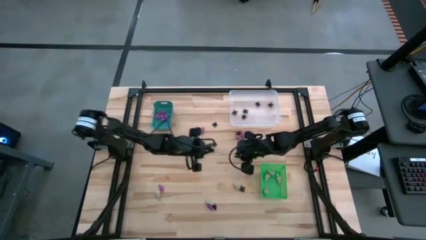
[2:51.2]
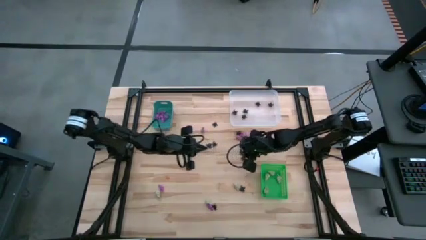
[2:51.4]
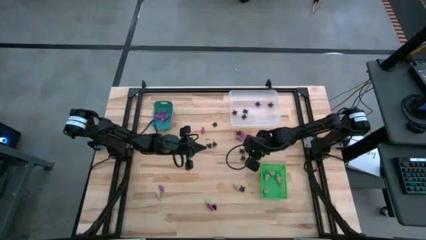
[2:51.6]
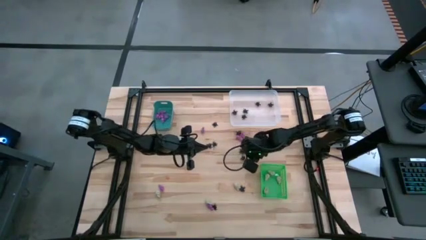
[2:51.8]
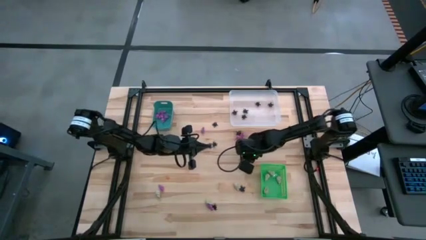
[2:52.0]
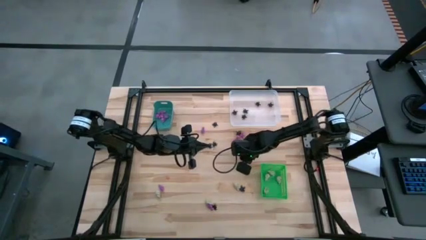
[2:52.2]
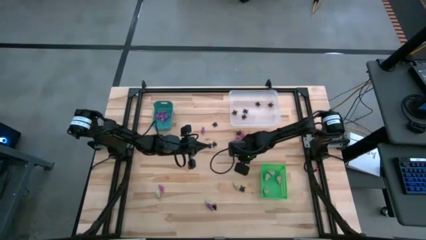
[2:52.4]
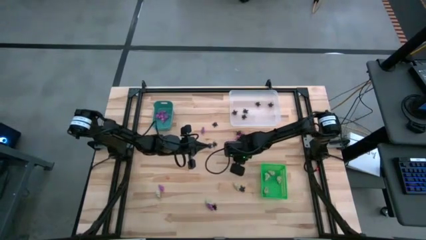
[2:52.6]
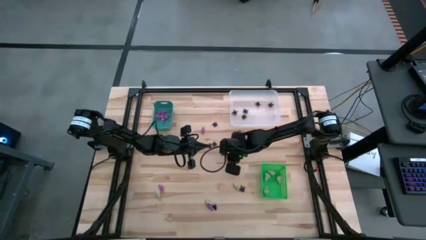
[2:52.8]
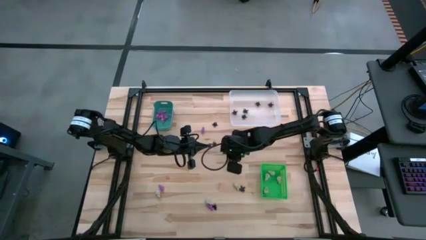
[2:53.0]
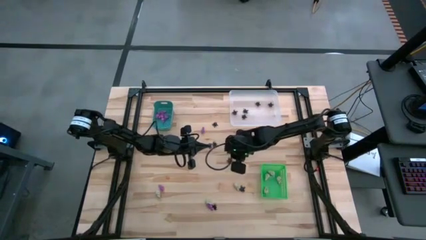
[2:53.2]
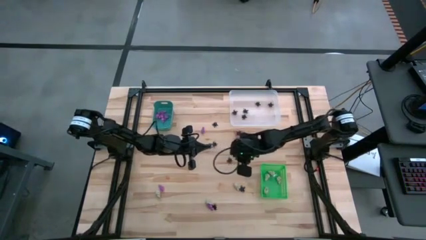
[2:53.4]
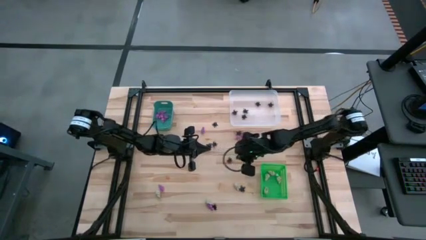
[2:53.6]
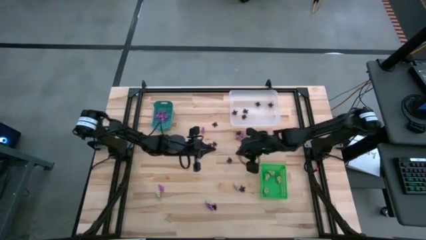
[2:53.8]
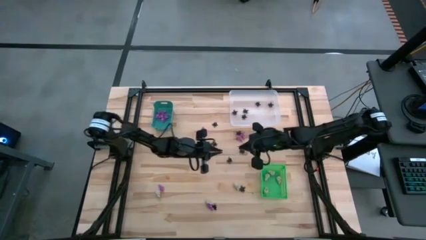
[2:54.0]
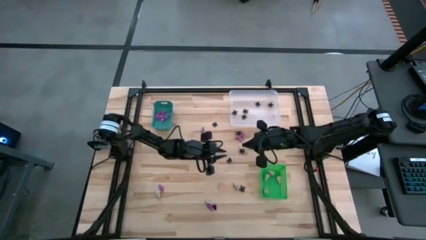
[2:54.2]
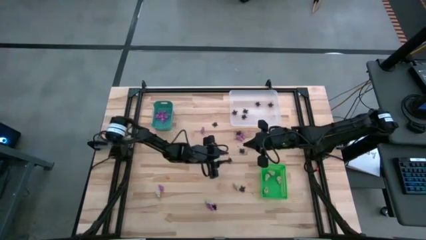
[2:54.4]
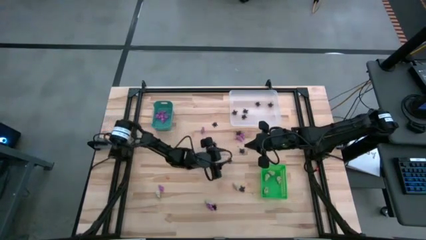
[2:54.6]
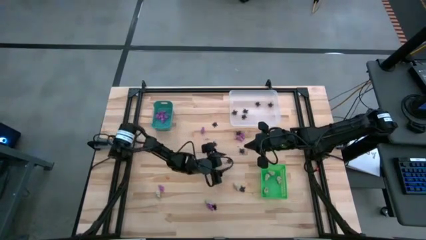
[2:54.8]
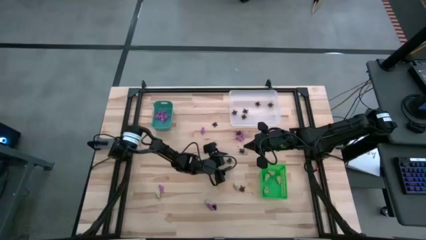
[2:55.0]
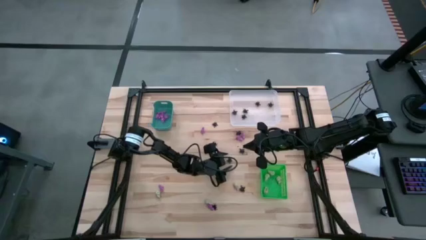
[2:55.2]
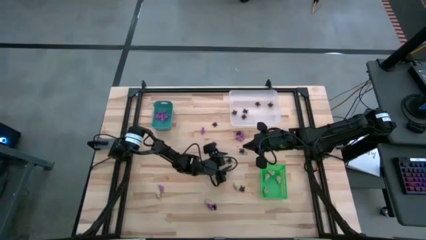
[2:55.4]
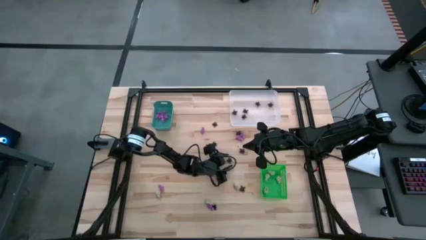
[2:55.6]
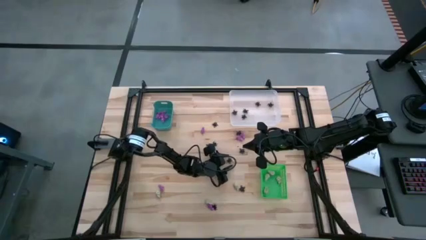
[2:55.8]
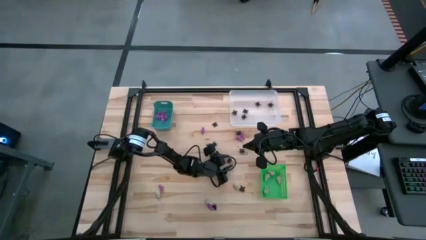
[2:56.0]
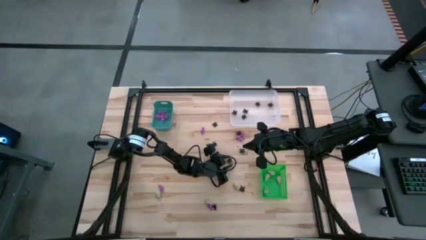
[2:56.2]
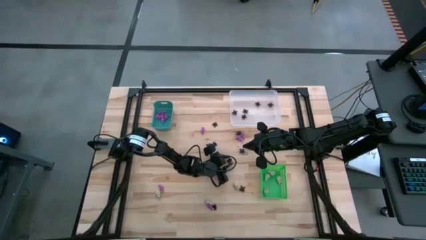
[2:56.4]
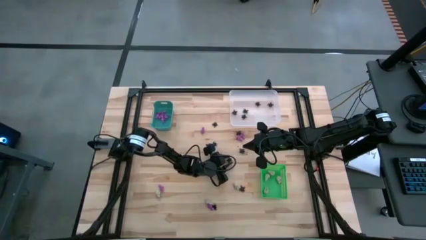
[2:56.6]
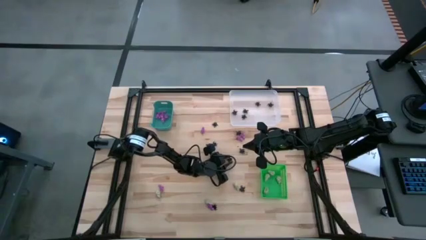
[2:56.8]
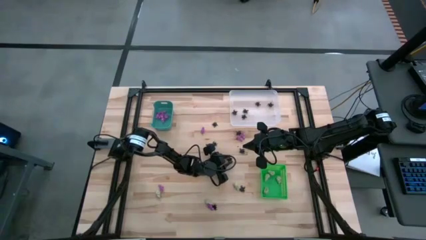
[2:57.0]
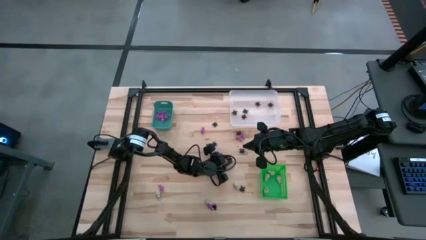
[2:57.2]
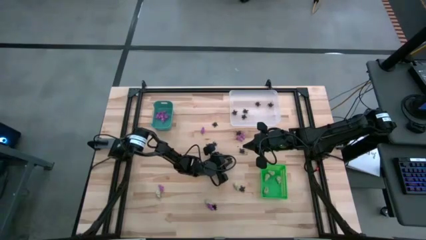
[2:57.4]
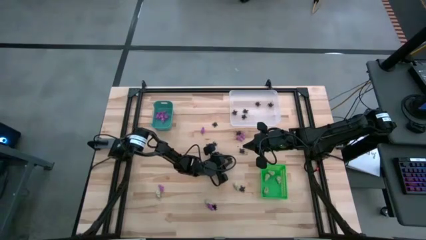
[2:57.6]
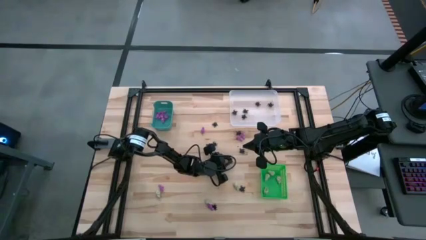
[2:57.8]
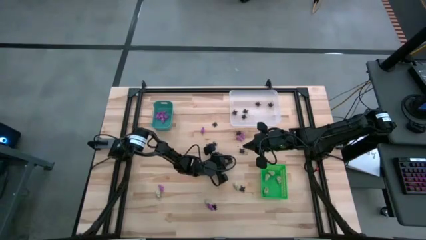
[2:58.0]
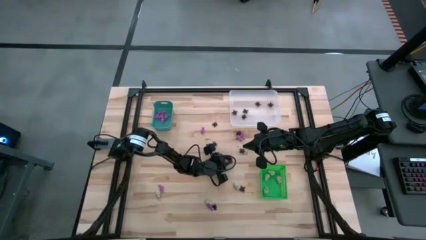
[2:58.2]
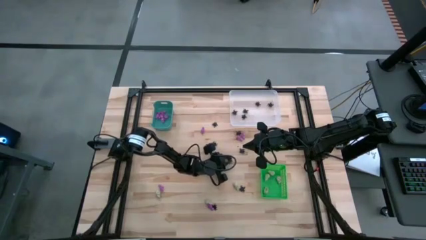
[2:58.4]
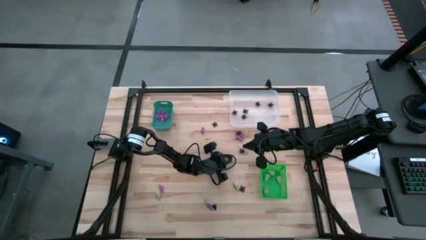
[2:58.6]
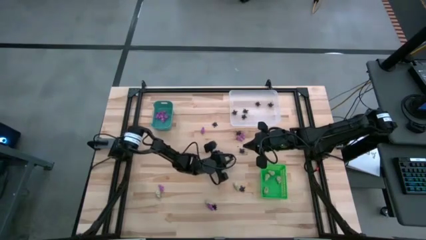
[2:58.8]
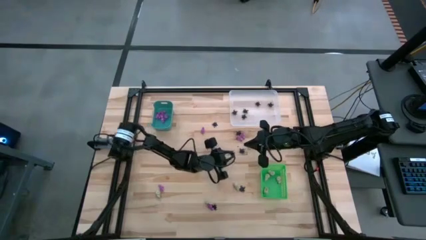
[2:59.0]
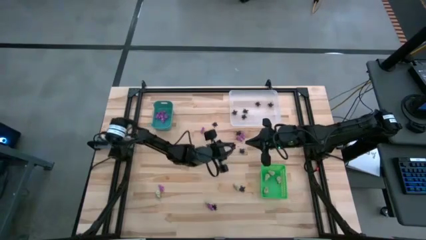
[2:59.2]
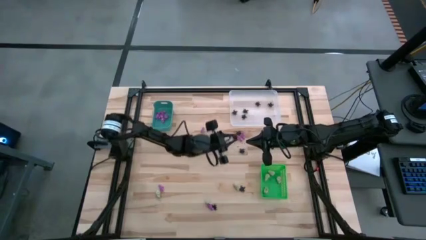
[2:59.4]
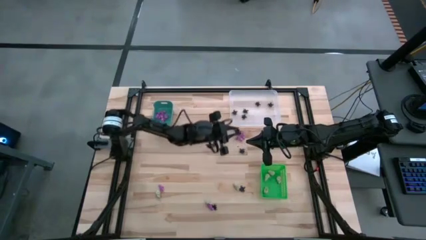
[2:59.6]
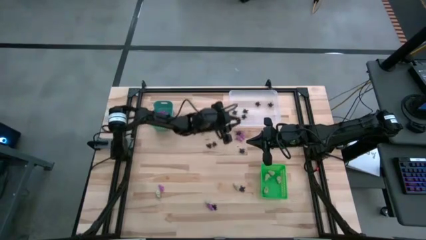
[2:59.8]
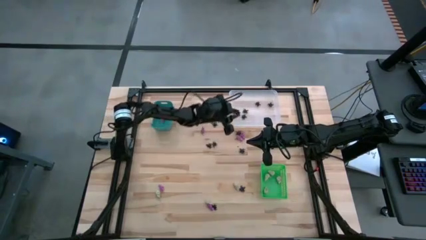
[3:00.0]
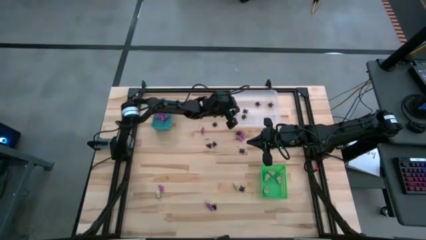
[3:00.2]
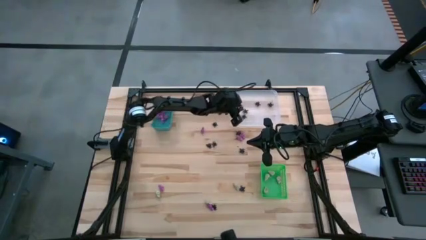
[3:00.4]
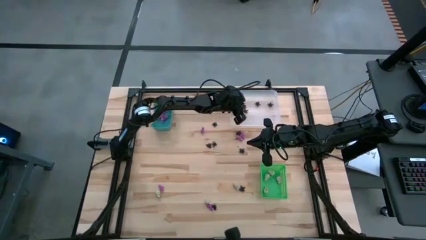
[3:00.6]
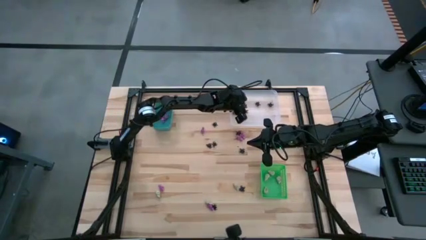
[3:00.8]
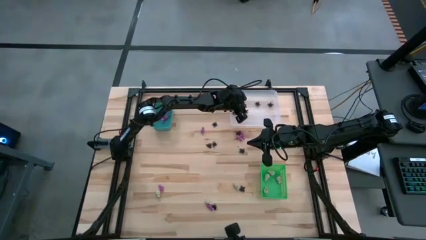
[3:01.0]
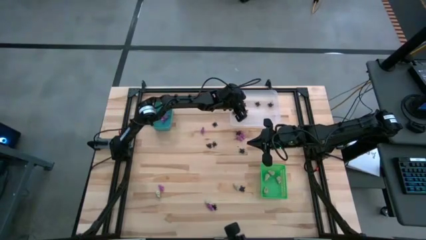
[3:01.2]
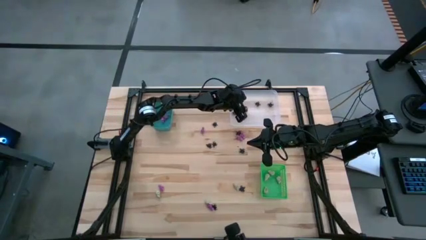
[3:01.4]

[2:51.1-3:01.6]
Task: Sort Halloween decoration
Put the black spider toy into the white bin

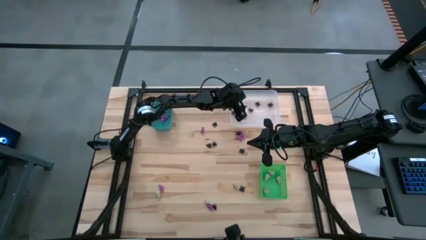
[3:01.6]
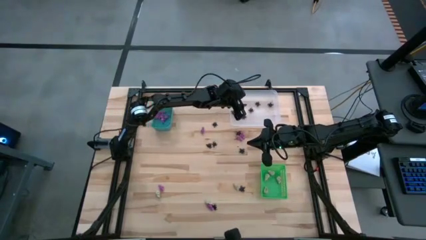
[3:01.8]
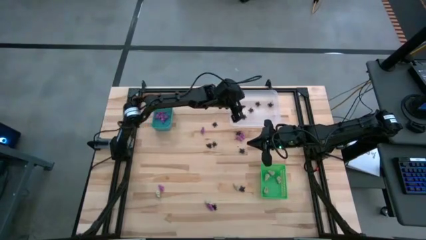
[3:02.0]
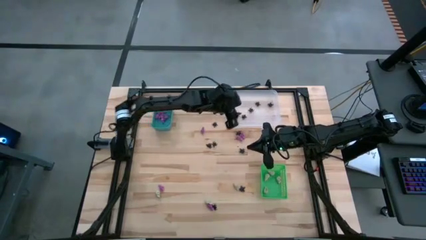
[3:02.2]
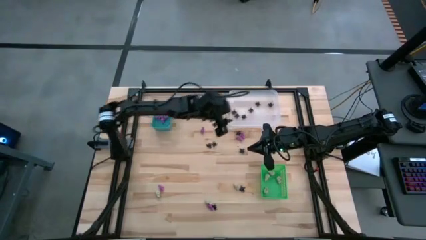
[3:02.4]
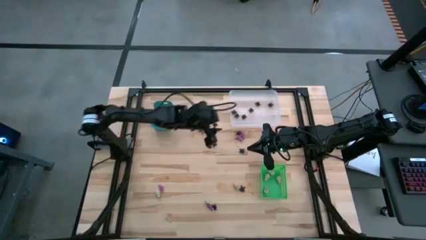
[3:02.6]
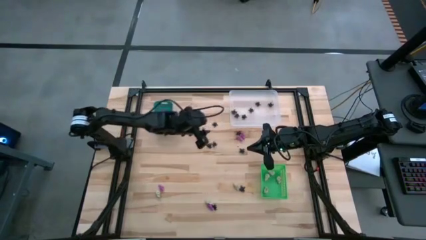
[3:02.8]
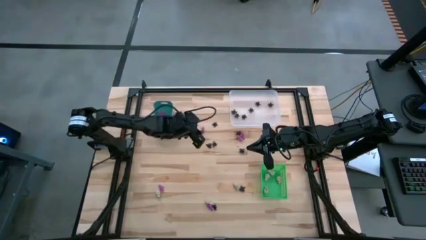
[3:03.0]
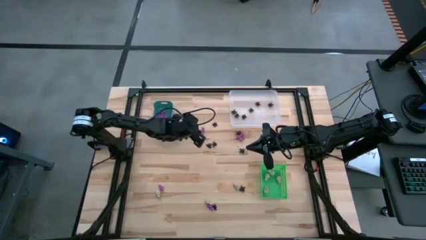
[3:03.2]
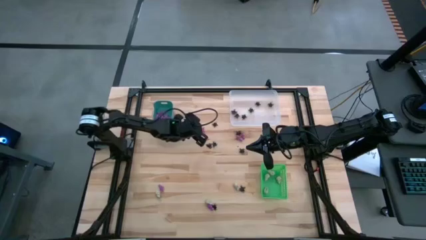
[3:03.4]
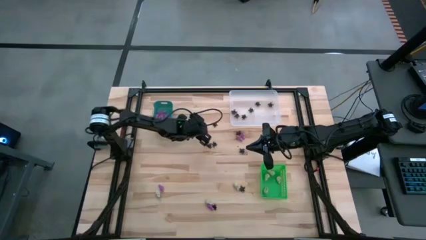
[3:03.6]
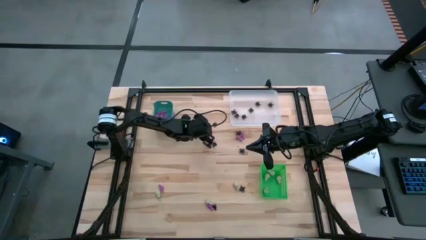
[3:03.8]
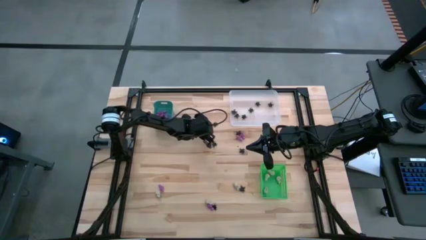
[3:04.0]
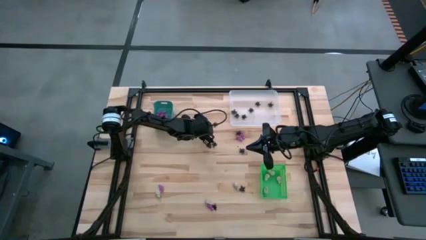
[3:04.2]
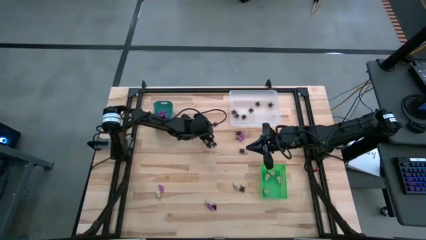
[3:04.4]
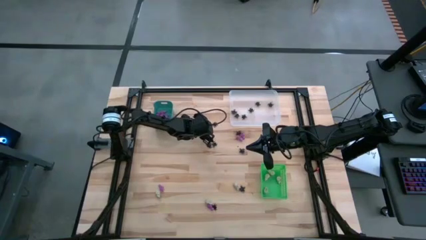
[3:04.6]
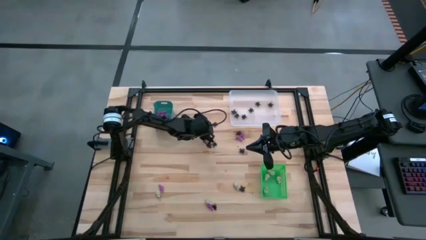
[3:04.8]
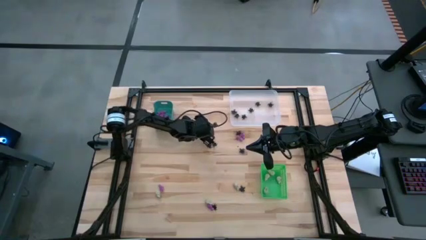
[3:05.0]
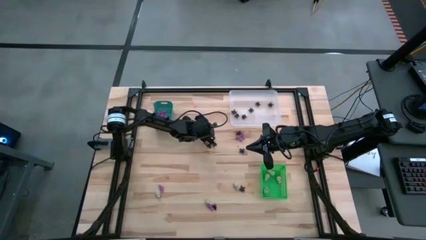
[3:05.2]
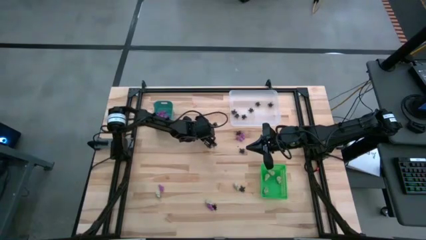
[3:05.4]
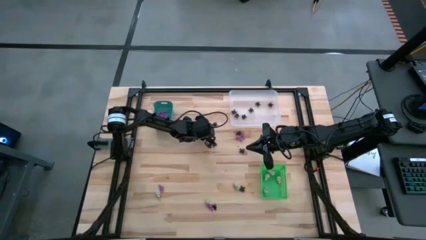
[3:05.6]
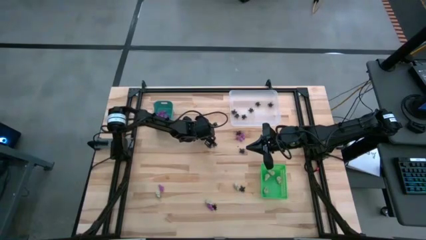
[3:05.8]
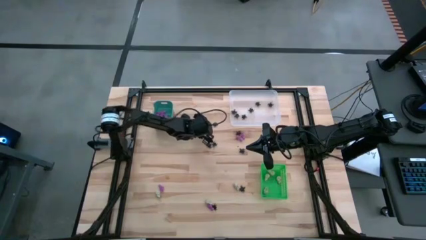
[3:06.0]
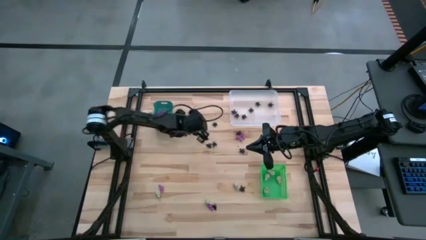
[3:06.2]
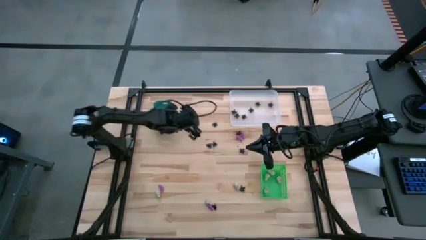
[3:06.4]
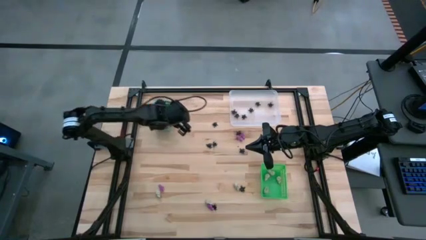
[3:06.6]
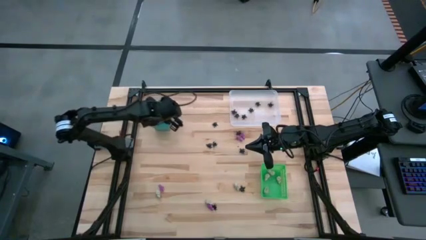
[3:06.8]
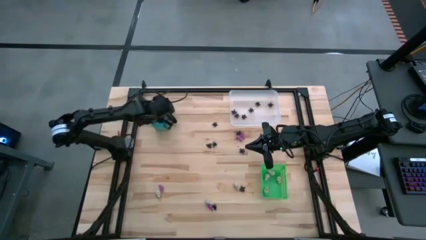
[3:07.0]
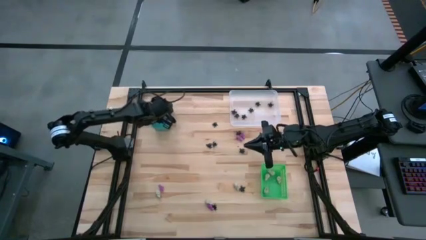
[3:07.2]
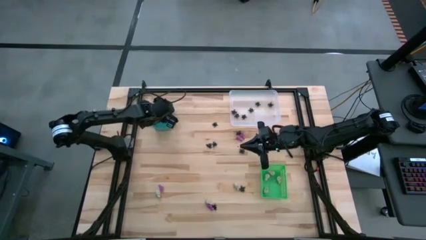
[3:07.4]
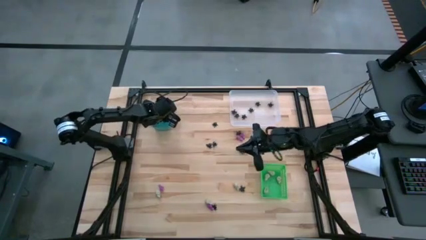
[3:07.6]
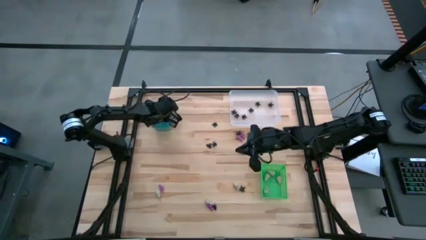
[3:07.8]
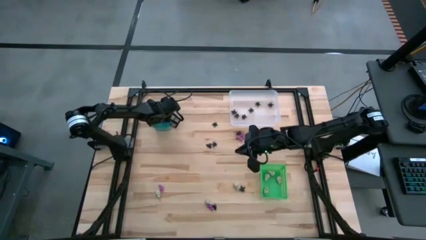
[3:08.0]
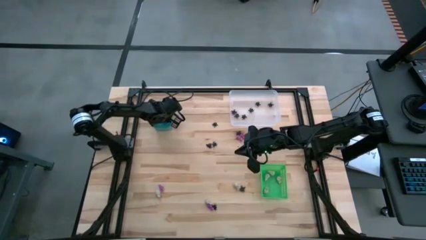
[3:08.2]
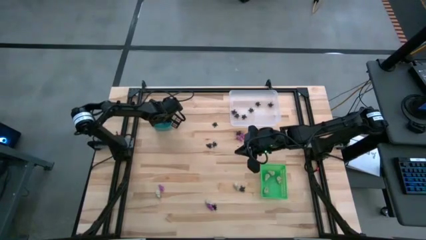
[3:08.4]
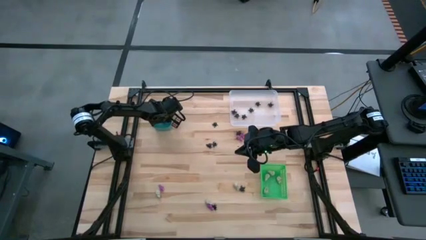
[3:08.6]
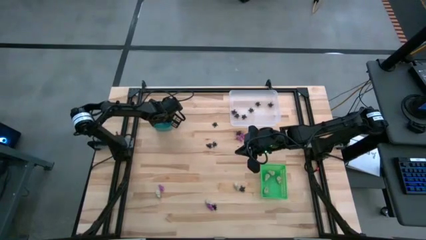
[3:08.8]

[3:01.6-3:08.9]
Put the purple skeleton toy into the blue bin
